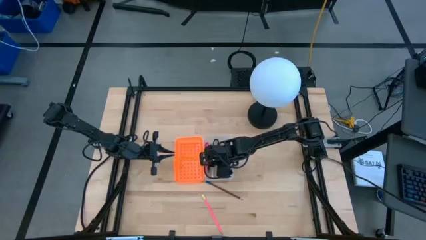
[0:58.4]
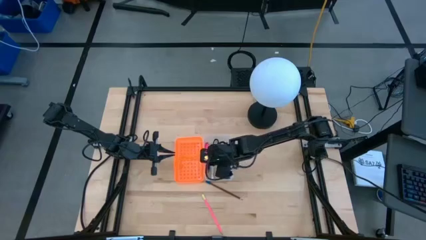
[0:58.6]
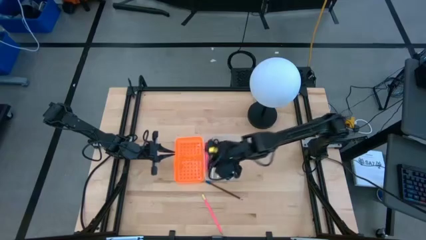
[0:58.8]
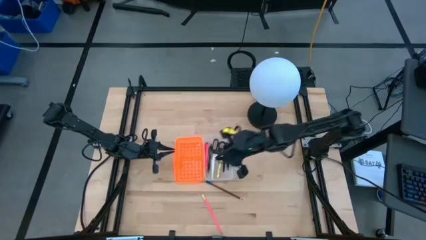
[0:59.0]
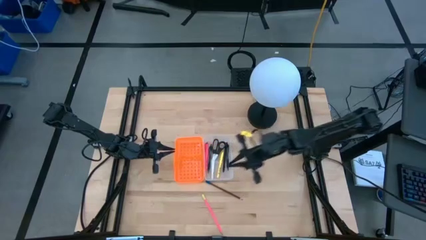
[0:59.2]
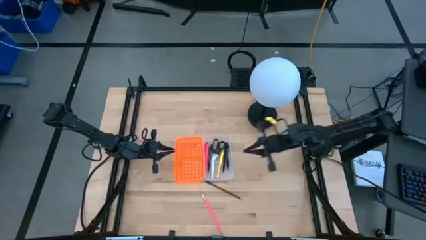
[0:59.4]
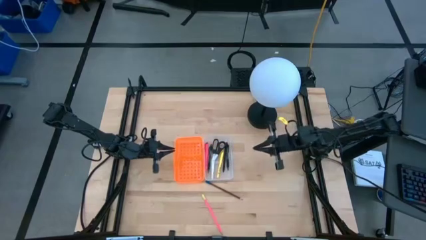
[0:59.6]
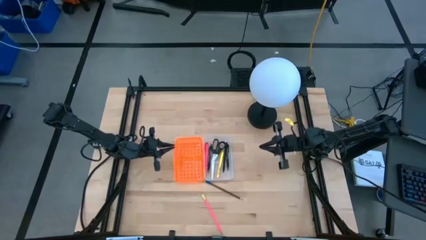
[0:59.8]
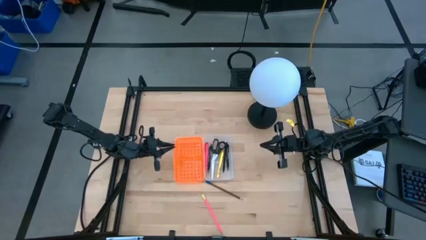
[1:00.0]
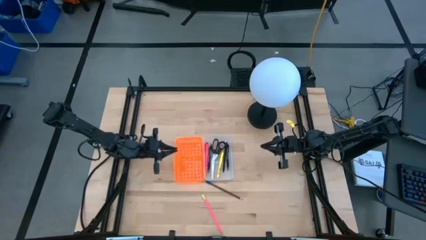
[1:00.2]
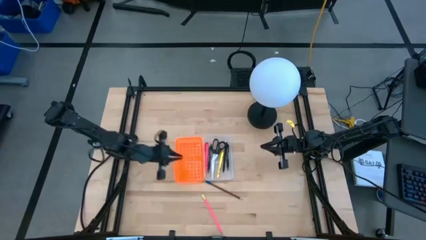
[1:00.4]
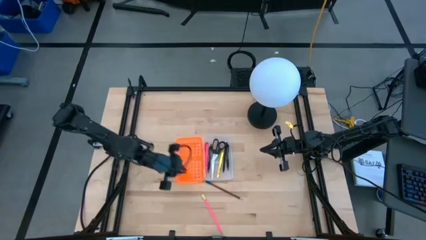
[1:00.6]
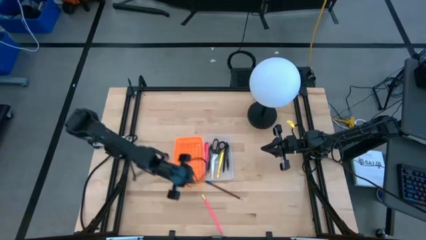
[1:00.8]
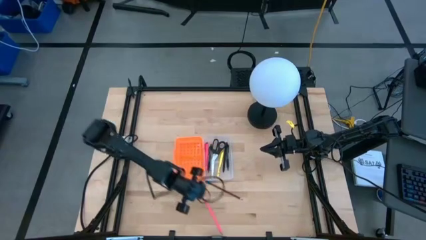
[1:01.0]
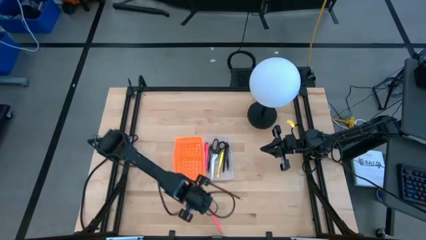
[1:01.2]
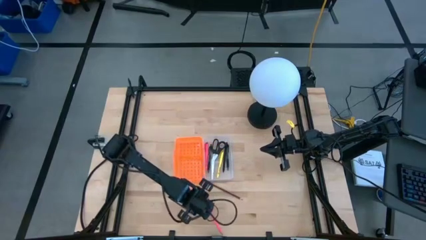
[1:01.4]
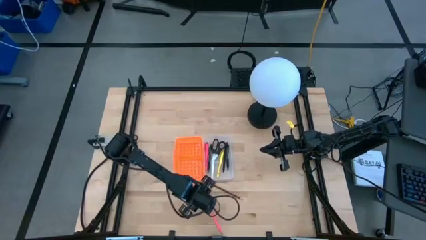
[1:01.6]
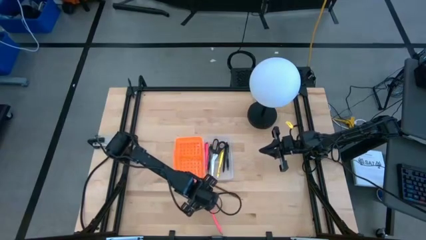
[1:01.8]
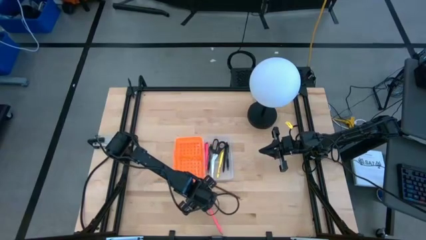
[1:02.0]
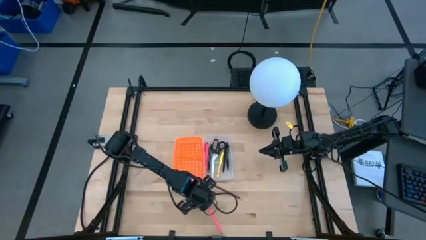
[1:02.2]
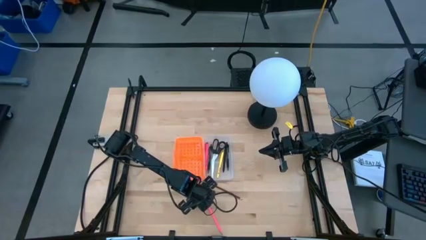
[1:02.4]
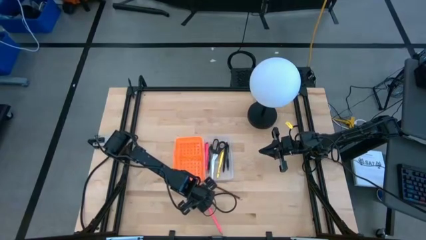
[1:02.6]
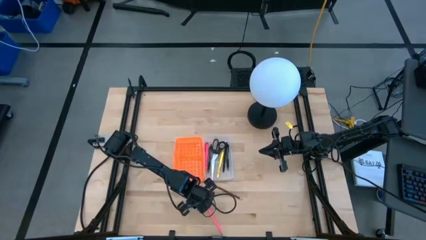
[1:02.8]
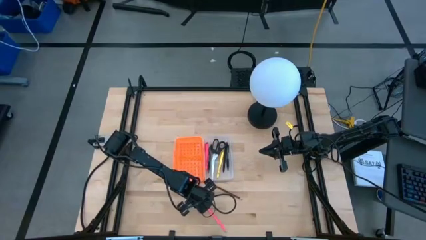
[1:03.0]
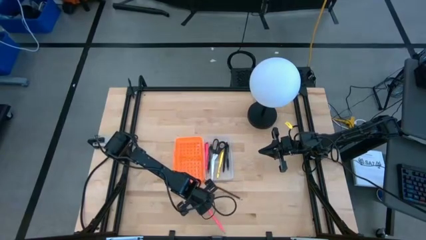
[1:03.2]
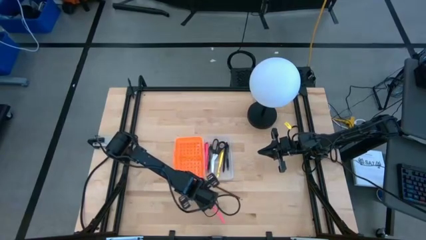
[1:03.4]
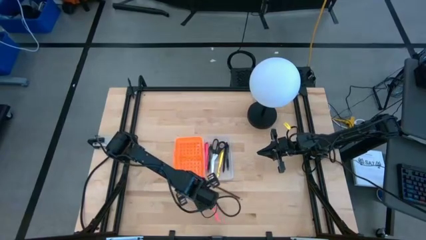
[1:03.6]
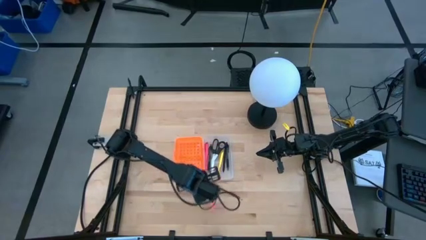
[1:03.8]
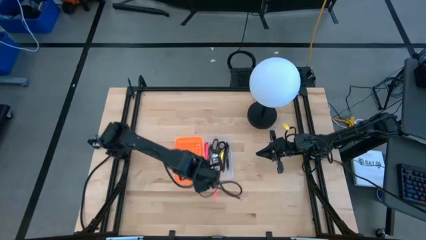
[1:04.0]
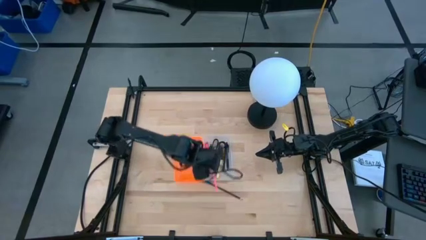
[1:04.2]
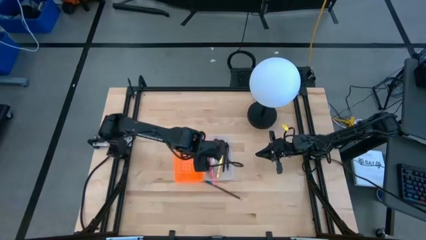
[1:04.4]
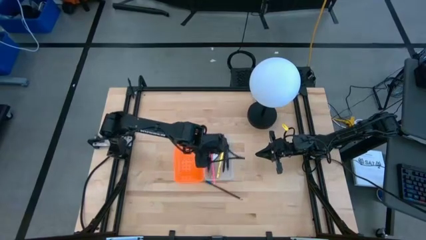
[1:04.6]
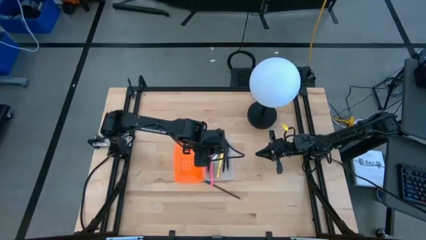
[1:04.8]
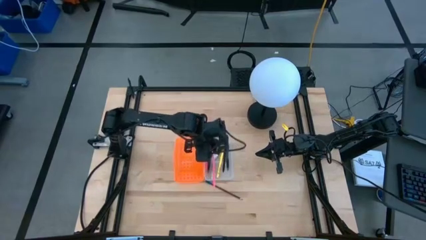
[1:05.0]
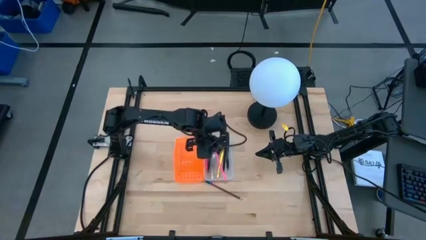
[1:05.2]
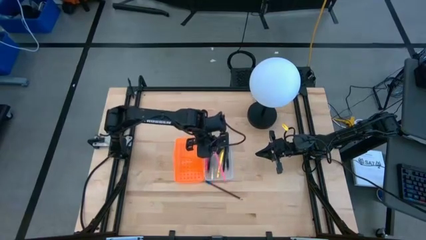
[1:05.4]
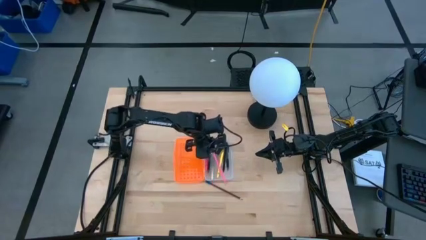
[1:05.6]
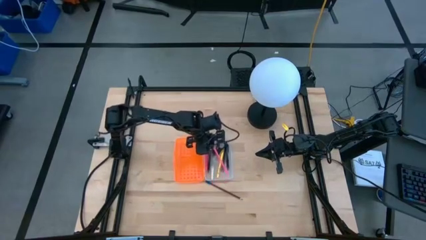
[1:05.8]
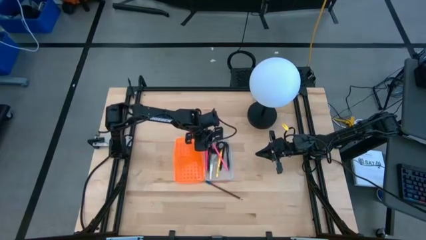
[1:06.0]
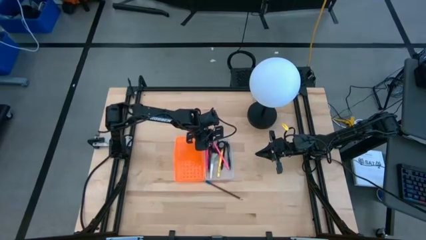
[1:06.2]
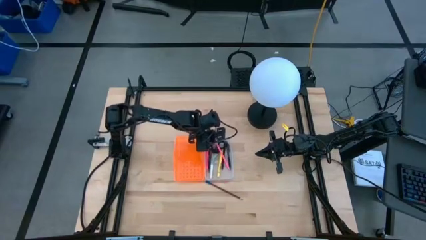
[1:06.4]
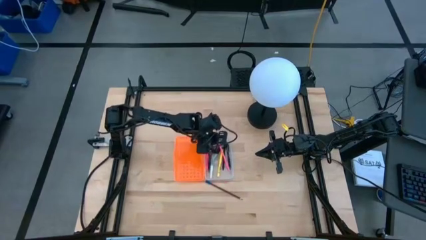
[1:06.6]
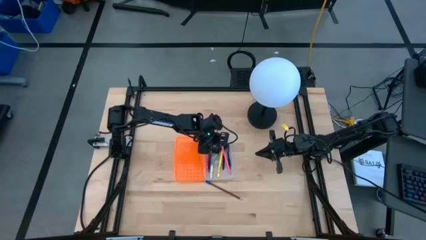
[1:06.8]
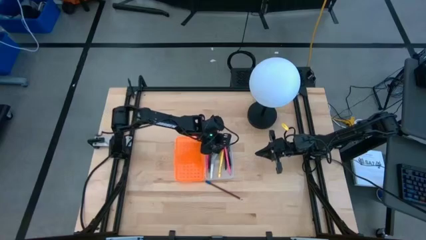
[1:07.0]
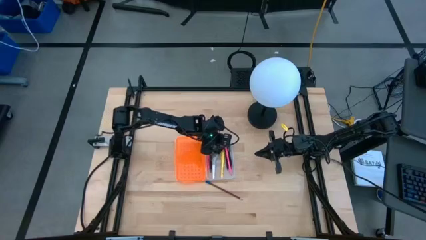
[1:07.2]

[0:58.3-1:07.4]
Task: Pick & place school supplies into a supply box
Put the pink pencil into the supply box
